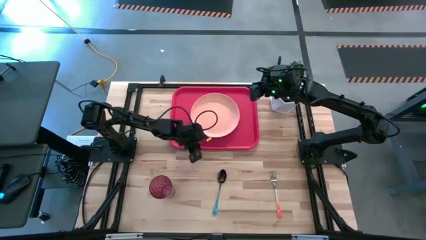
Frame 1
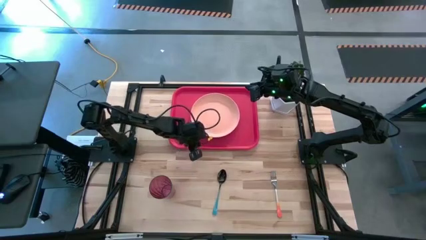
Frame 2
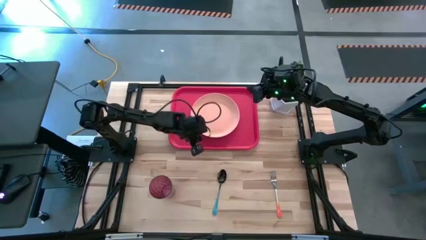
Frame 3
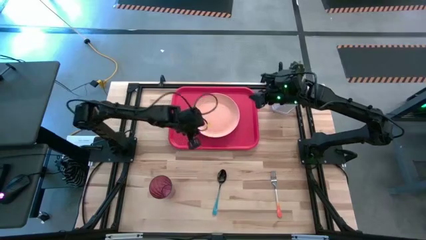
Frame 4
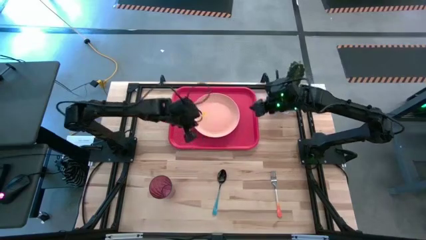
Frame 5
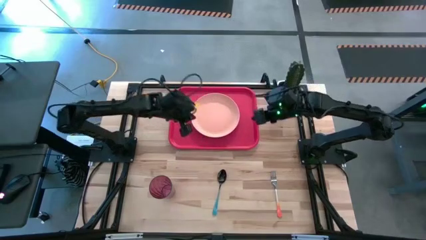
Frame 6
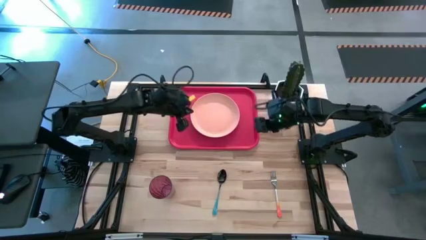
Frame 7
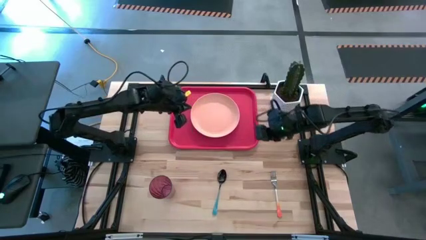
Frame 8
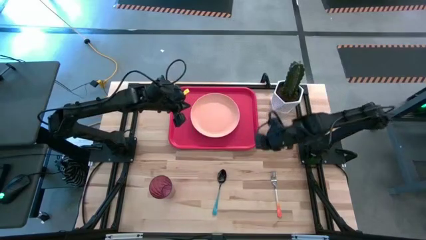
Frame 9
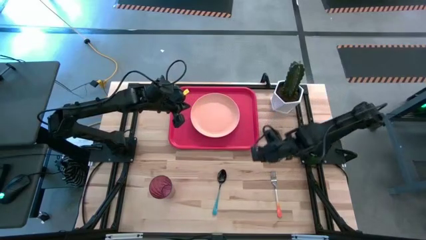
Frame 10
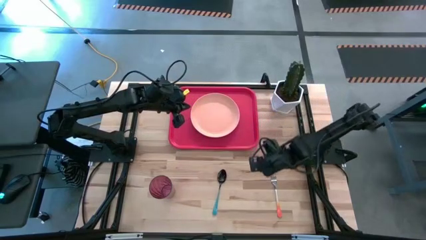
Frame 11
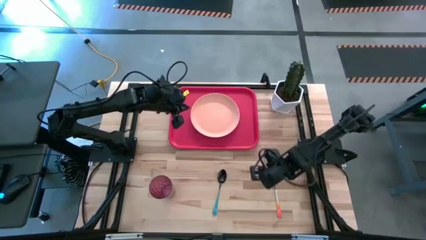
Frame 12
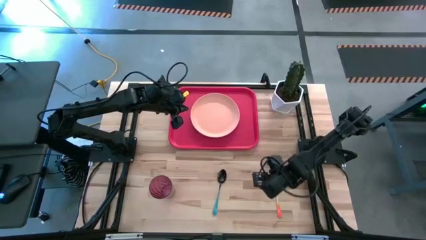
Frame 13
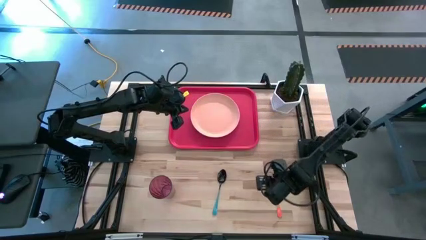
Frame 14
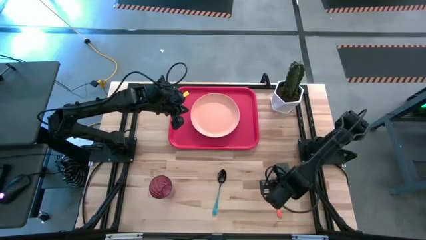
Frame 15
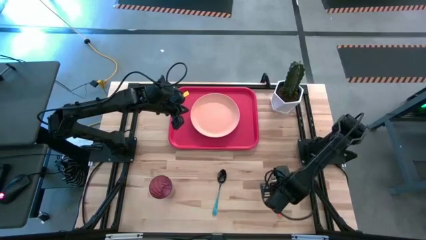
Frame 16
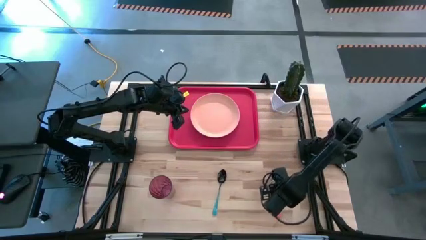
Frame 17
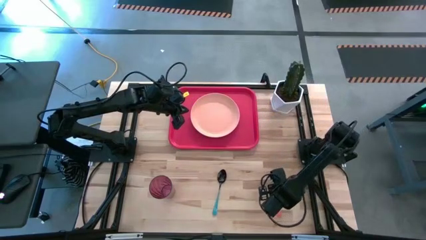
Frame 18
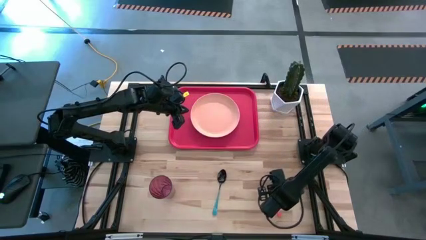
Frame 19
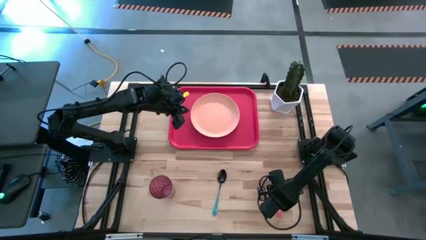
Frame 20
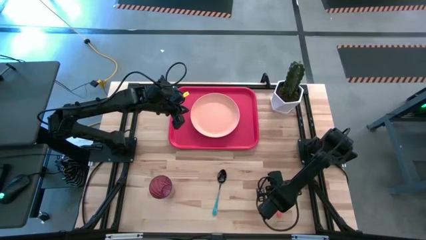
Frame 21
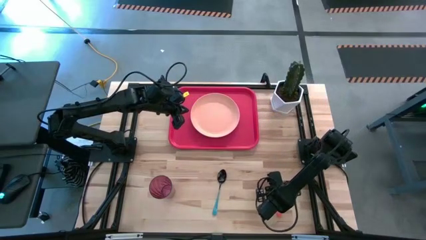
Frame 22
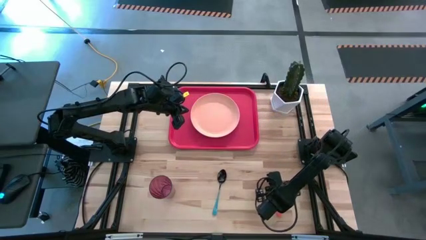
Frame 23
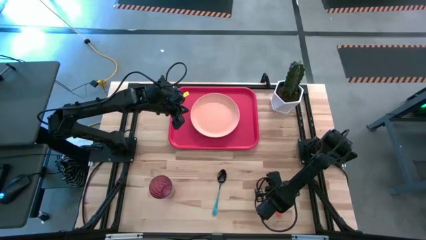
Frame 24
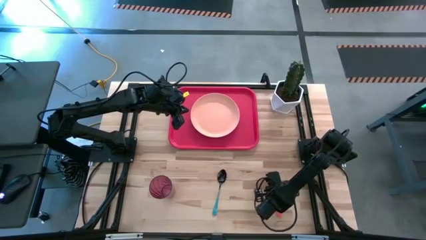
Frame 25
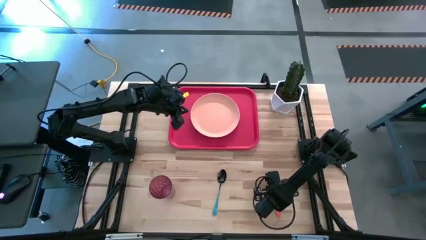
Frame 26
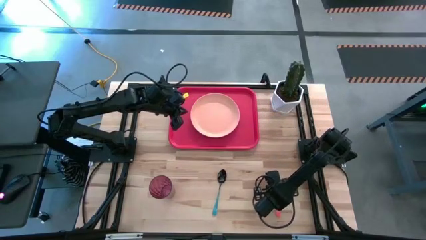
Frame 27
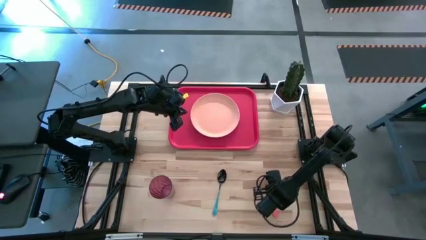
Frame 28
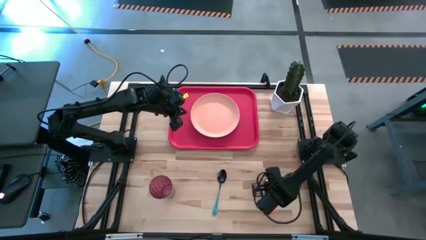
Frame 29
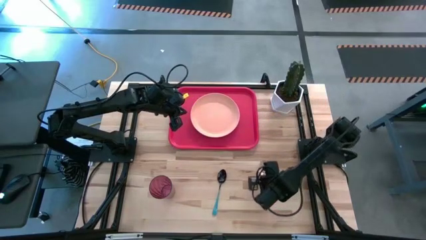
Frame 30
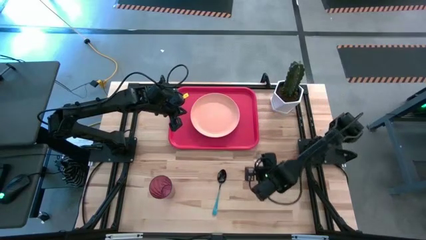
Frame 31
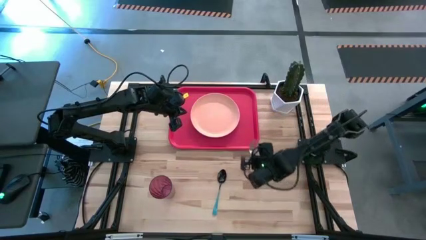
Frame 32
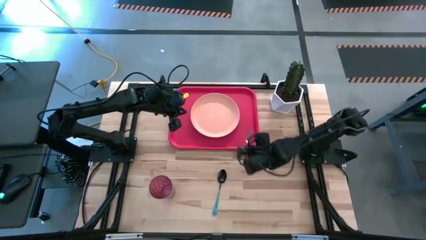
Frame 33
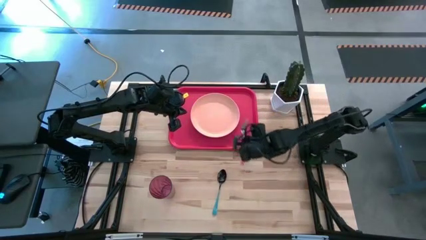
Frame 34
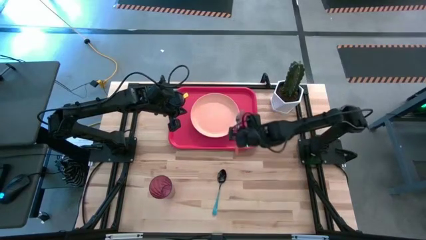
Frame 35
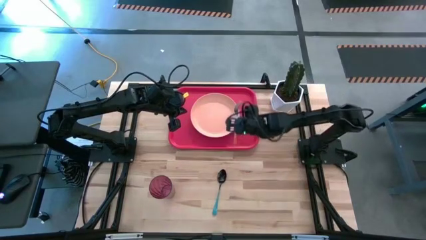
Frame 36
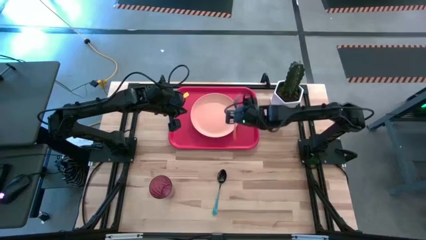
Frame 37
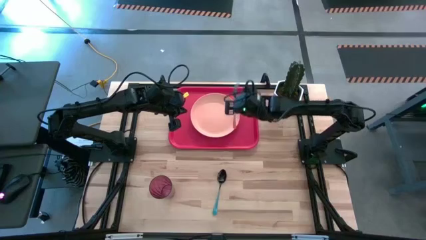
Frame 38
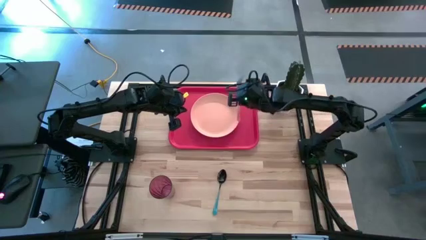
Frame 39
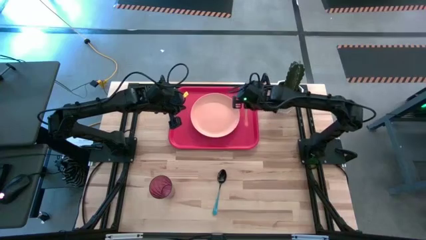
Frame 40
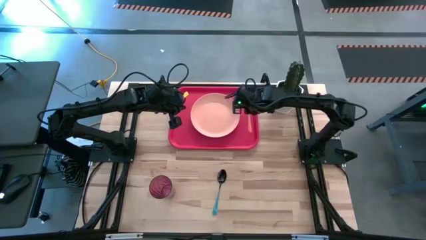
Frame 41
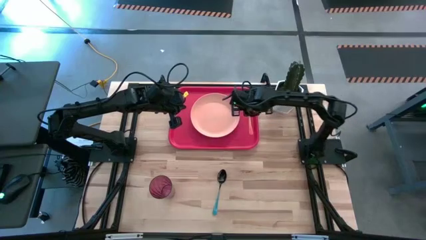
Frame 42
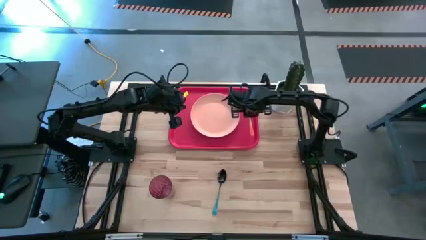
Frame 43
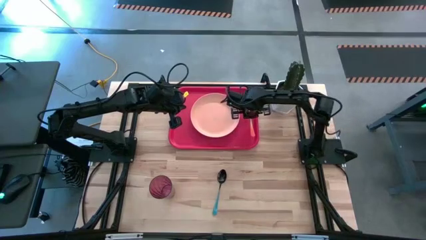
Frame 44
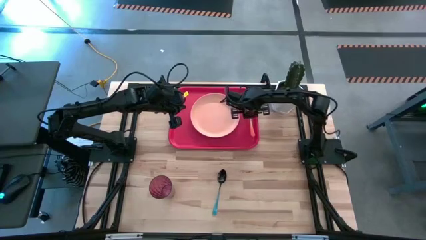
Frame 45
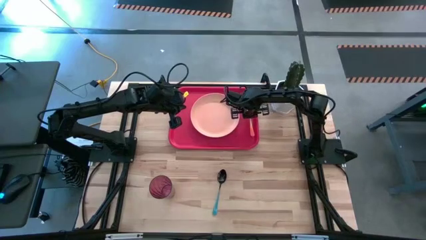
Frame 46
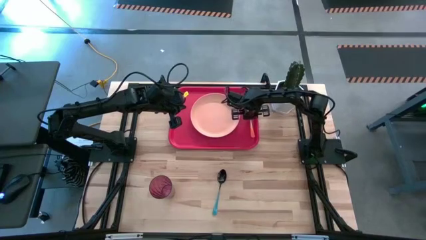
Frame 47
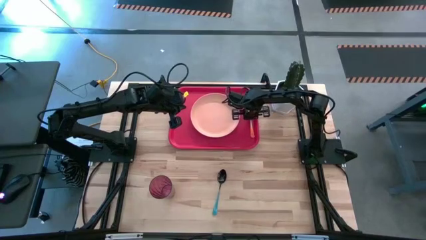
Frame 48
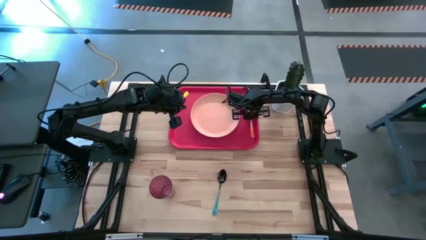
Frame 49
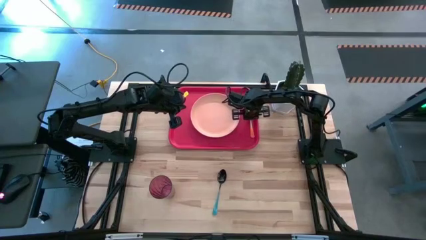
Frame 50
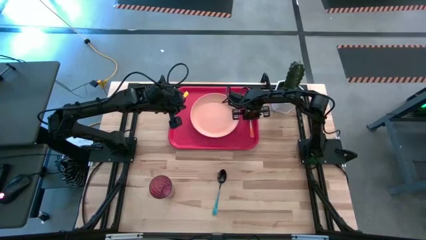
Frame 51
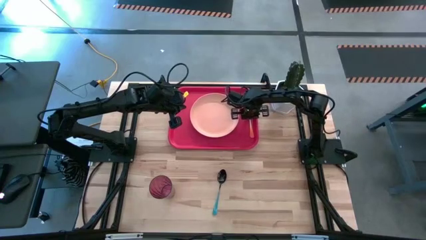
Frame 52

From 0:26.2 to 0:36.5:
Task: Pick and place plate/cup/fork/spoon on tray
Put the orange fork on the red serving tray to the right of the light orange plate

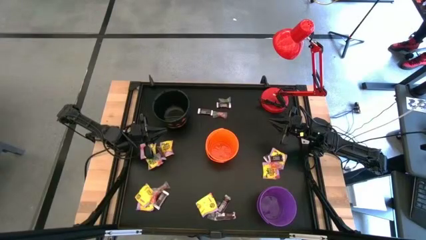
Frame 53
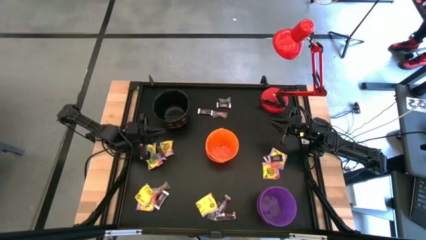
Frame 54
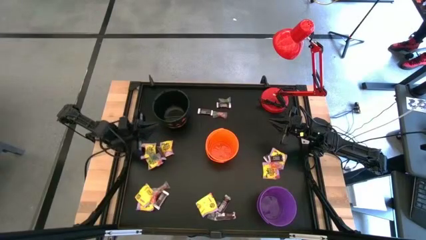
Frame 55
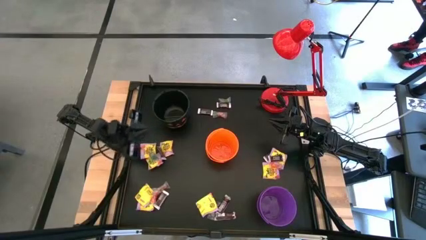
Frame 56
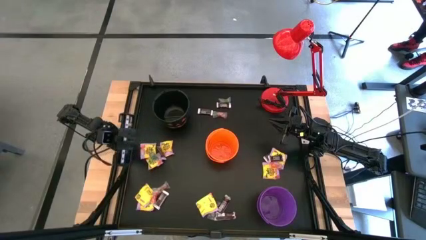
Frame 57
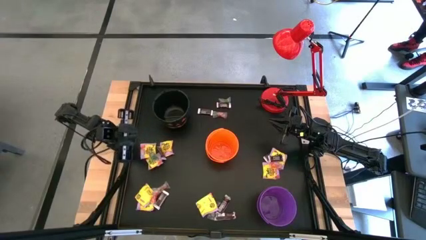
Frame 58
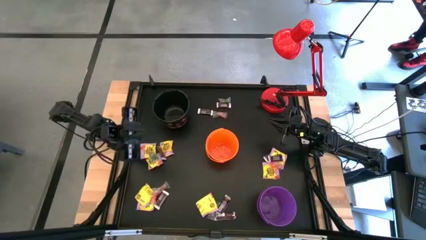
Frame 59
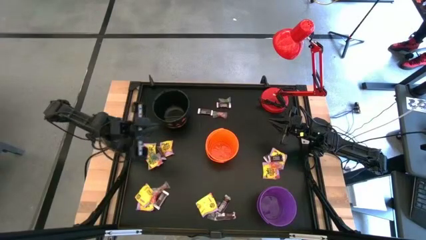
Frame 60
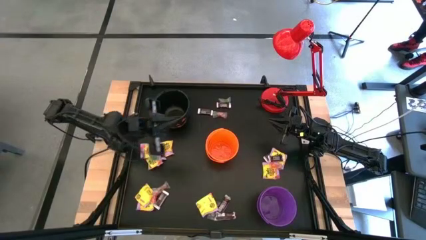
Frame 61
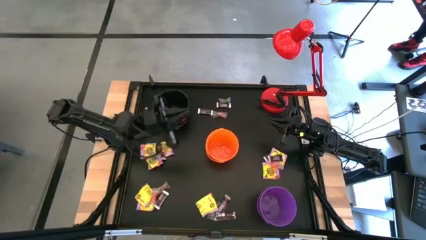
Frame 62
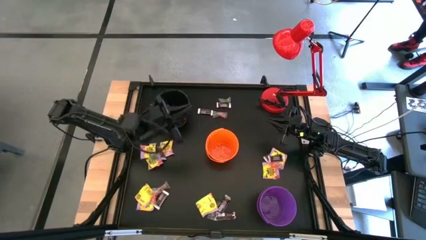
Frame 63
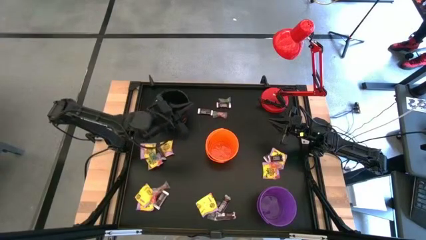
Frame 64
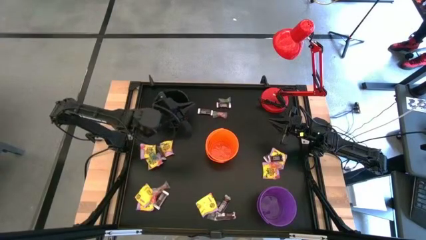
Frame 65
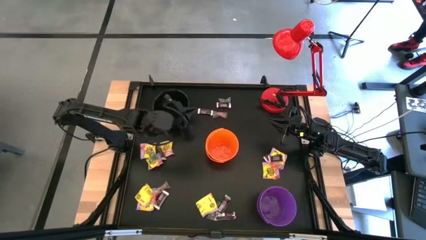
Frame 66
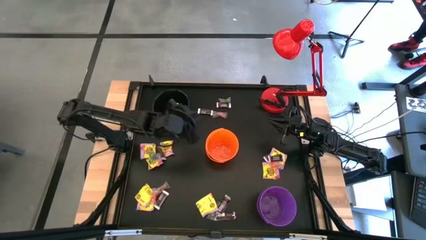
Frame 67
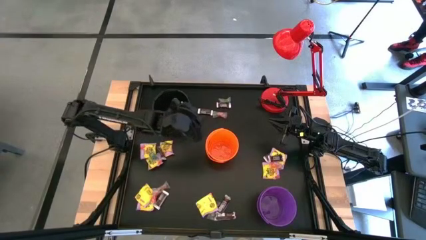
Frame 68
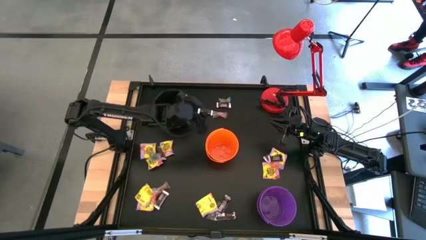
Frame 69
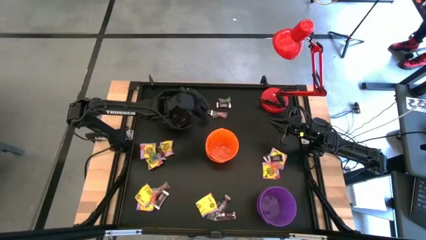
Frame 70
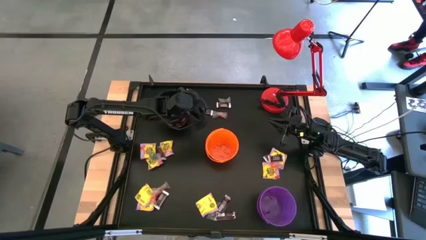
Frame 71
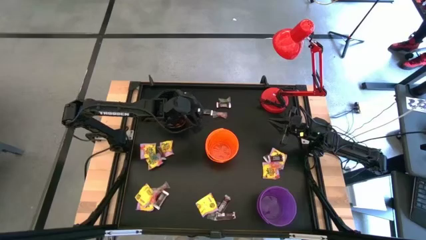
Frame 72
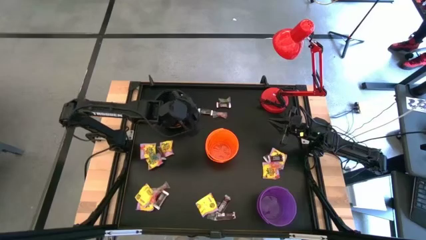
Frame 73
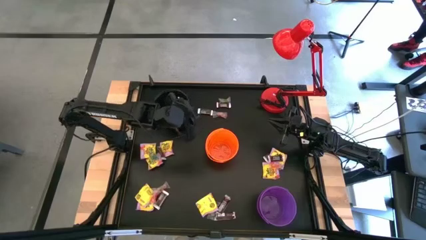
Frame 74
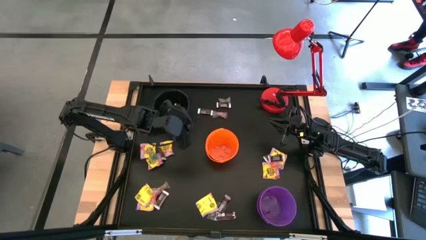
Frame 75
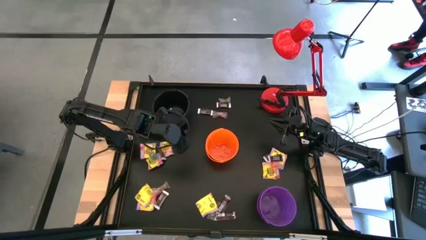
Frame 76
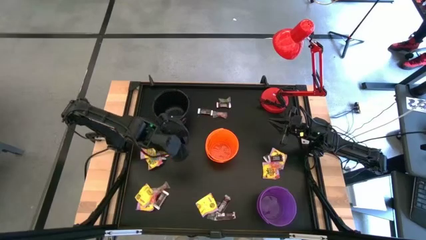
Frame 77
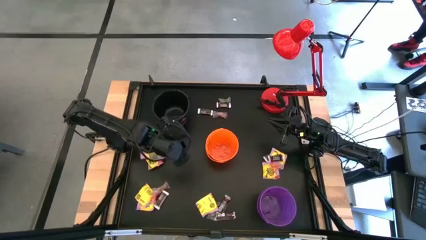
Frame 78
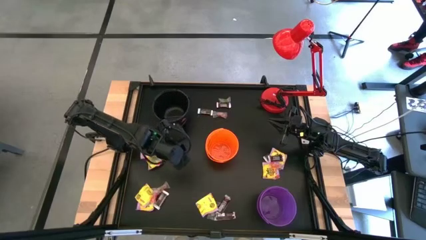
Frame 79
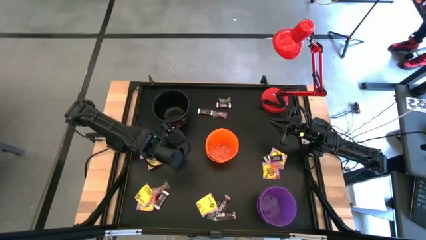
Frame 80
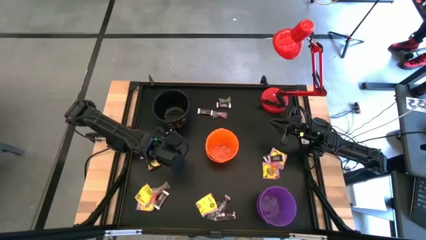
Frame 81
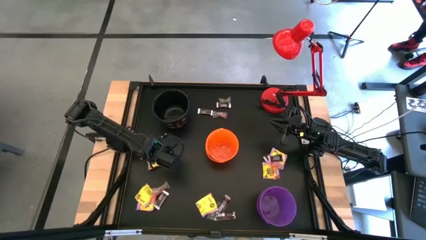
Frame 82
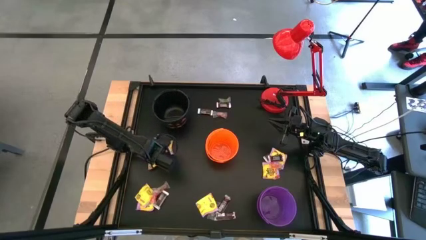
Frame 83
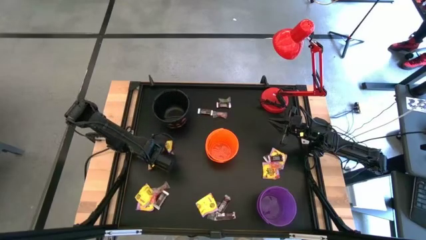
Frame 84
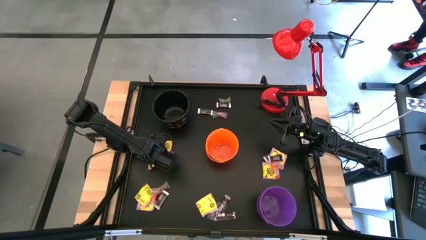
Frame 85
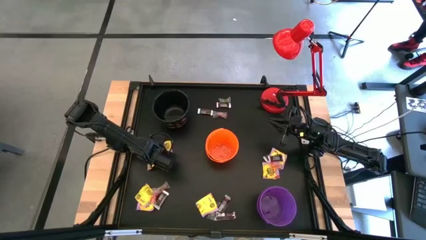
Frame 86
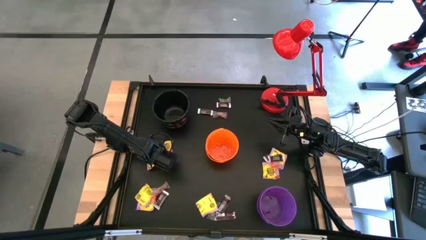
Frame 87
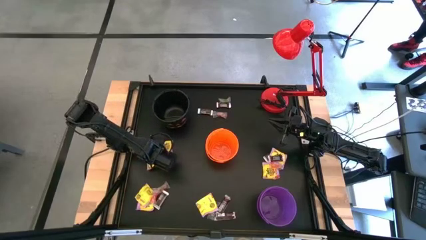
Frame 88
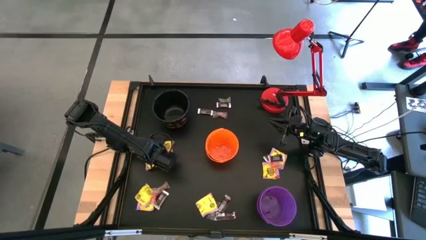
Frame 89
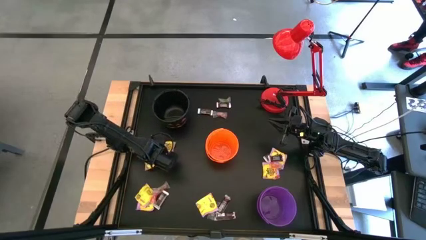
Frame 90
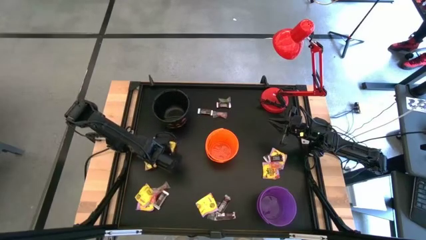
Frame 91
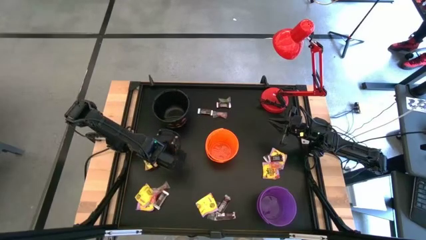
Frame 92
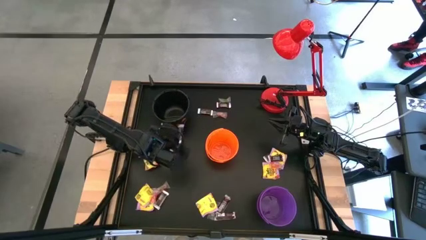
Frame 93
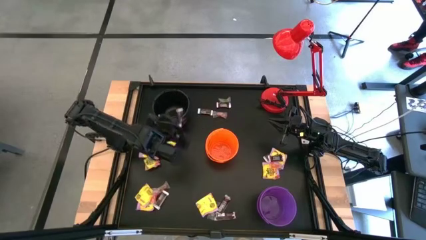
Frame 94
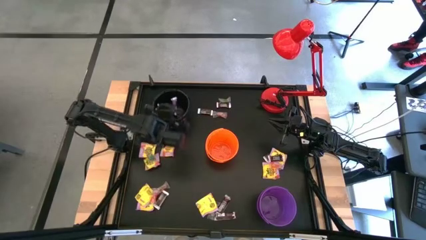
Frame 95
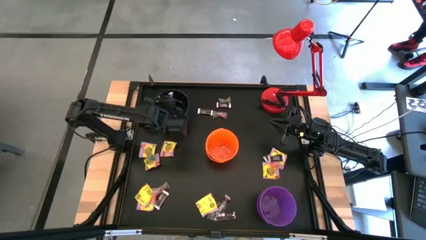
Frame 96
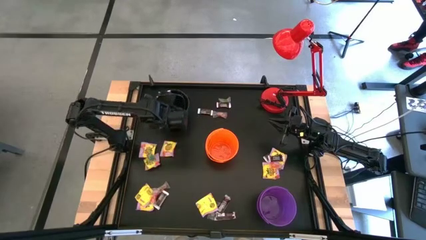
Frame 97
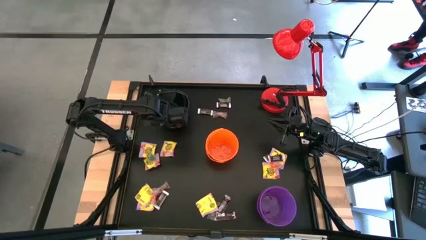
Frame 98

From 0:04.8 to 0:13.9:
Task: Sort candy
Put the brown chocolate bar into the black bucket
